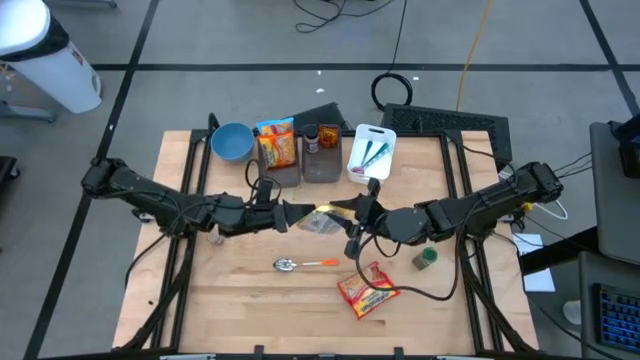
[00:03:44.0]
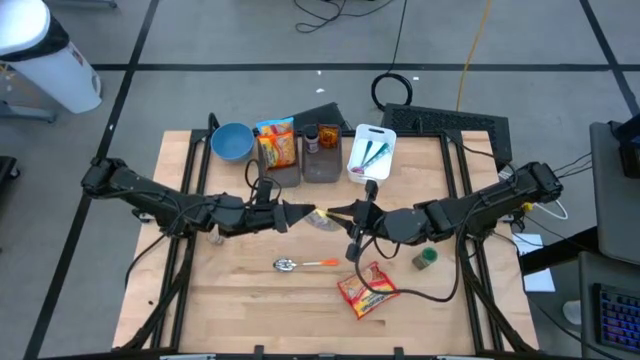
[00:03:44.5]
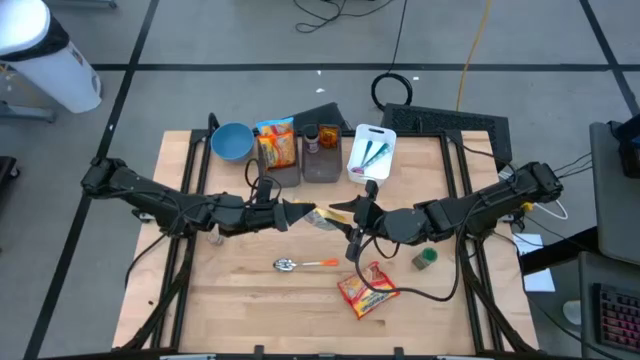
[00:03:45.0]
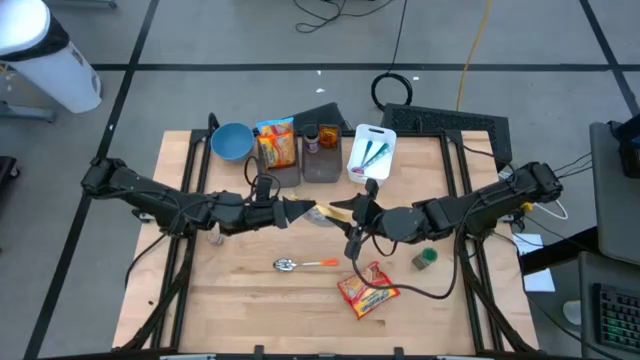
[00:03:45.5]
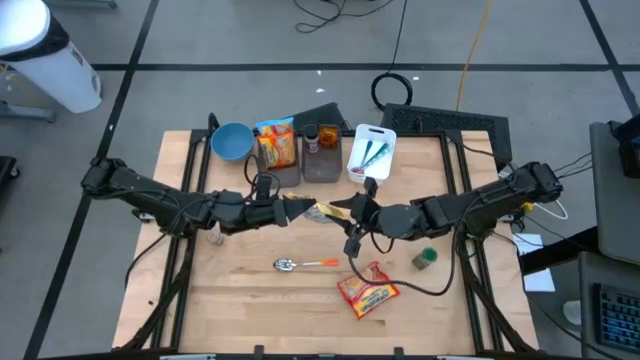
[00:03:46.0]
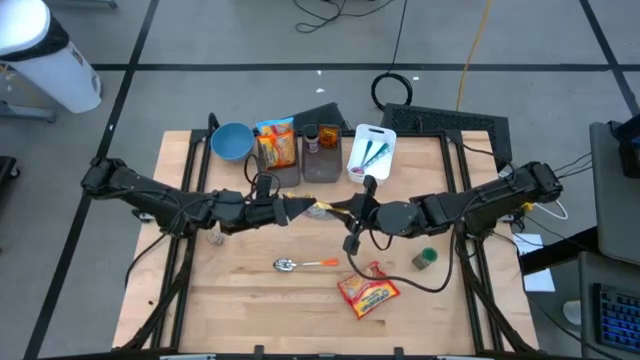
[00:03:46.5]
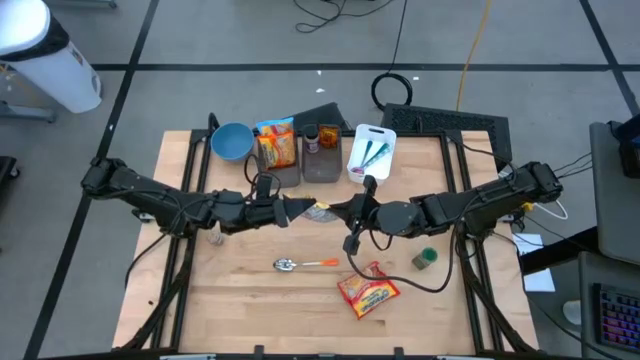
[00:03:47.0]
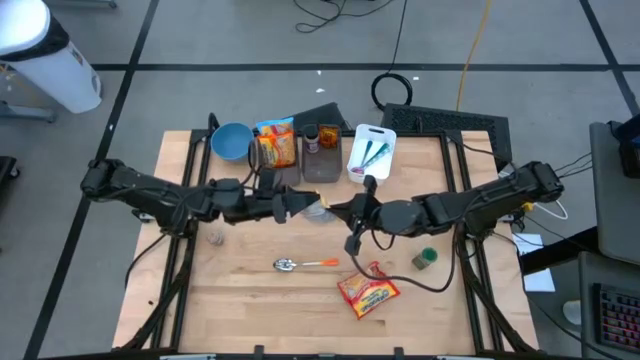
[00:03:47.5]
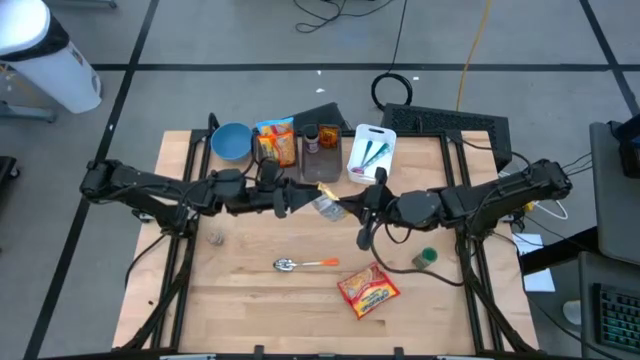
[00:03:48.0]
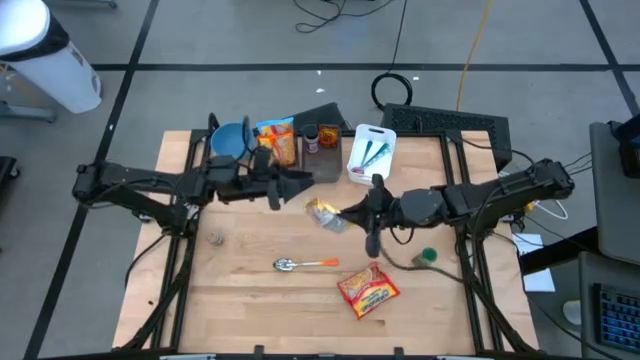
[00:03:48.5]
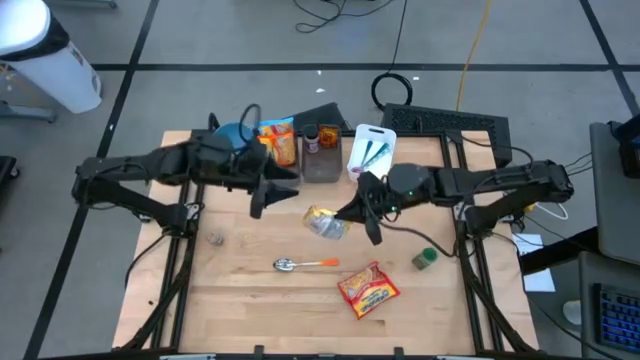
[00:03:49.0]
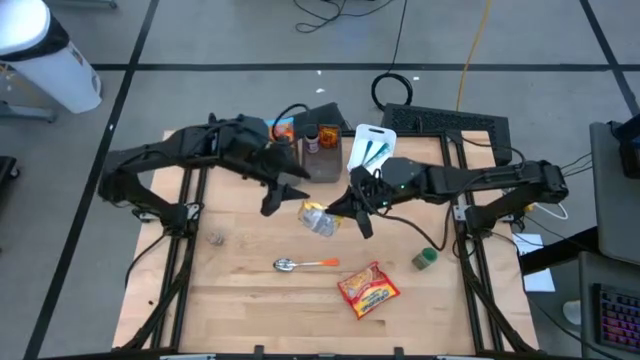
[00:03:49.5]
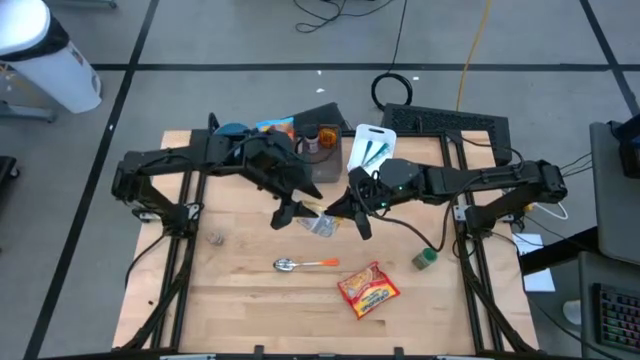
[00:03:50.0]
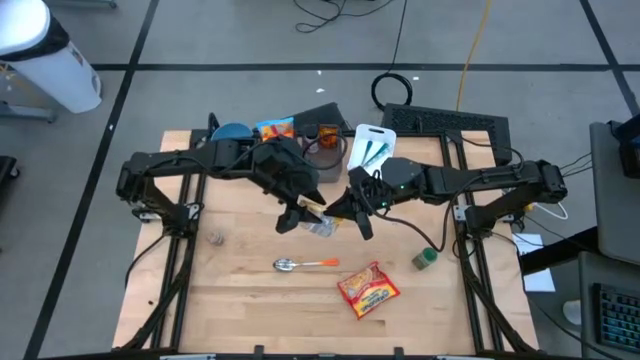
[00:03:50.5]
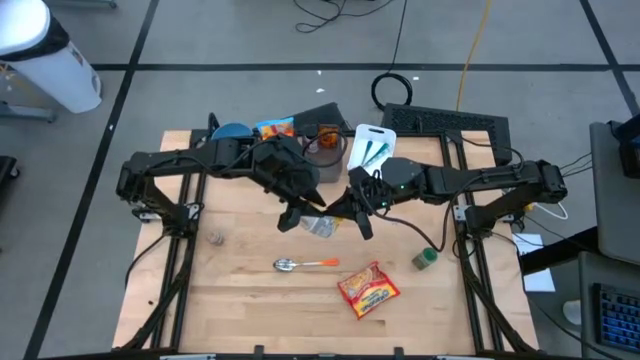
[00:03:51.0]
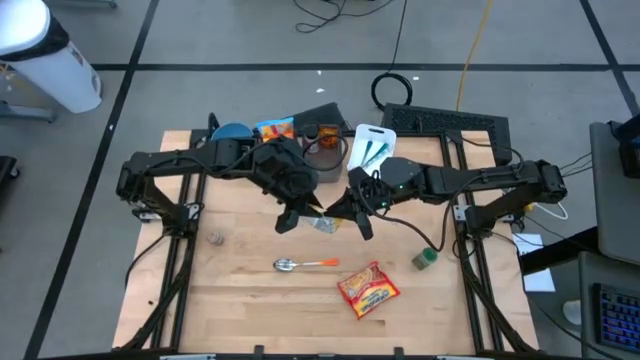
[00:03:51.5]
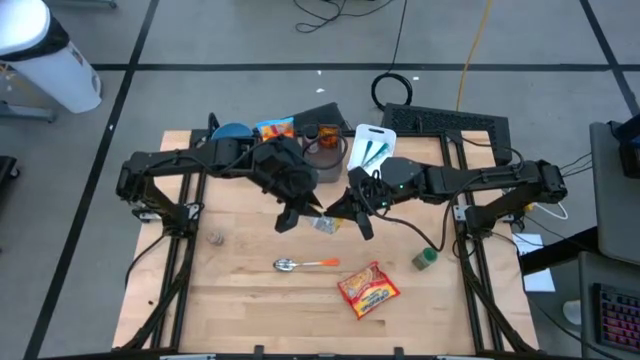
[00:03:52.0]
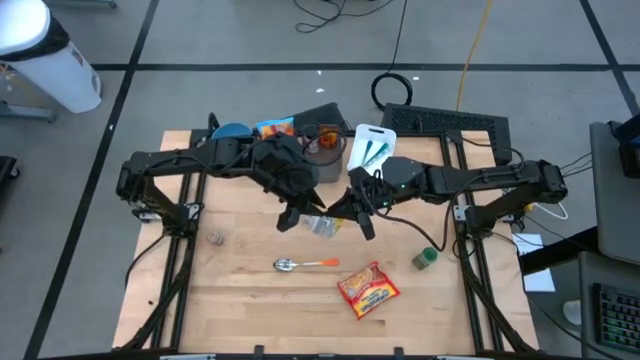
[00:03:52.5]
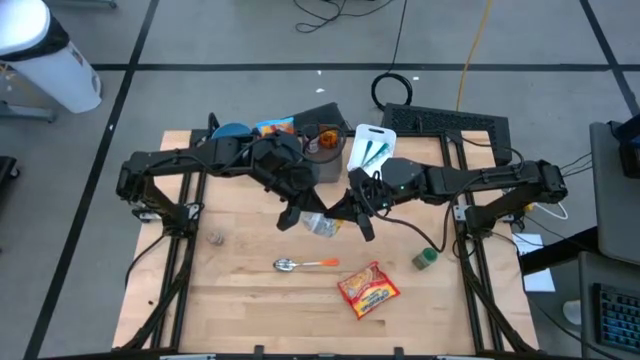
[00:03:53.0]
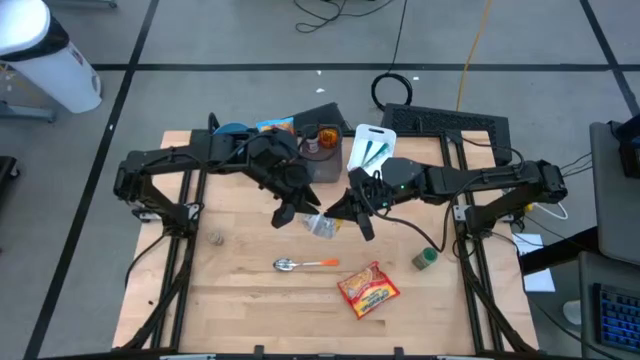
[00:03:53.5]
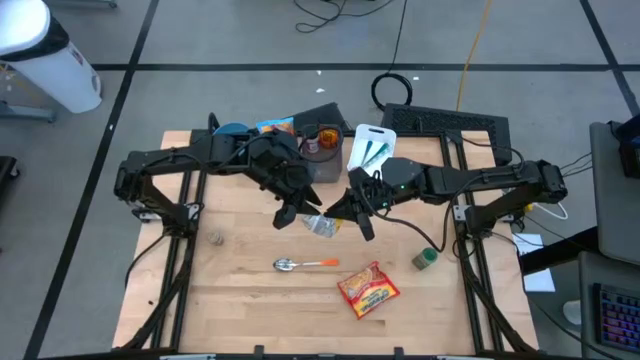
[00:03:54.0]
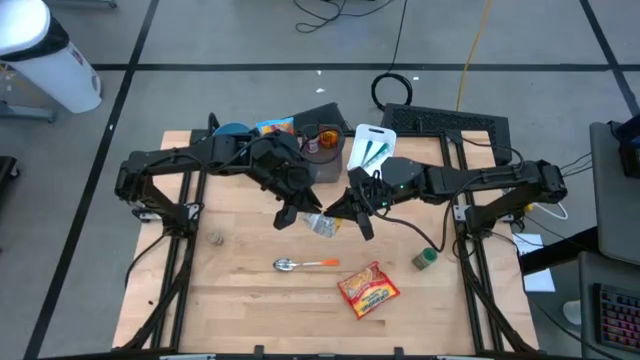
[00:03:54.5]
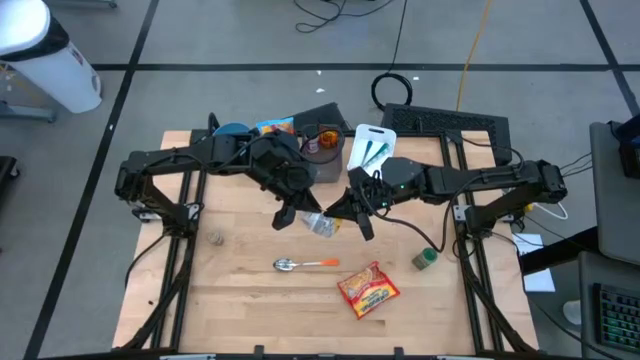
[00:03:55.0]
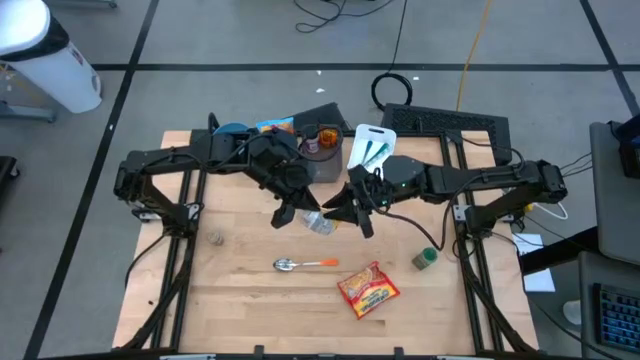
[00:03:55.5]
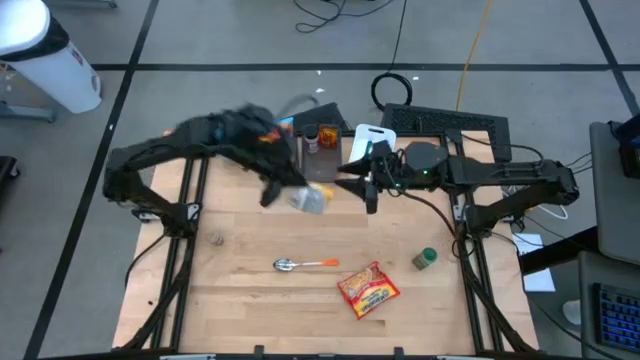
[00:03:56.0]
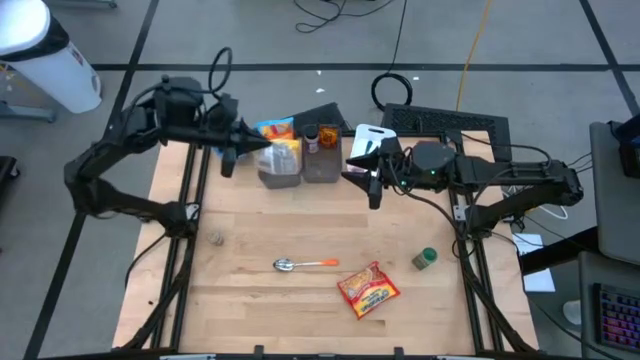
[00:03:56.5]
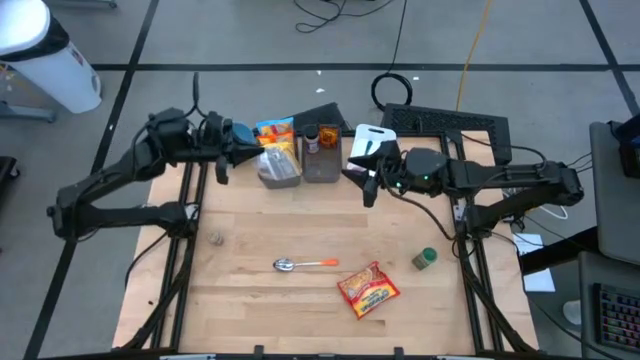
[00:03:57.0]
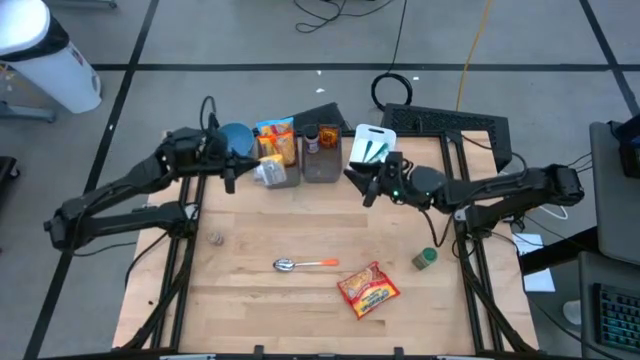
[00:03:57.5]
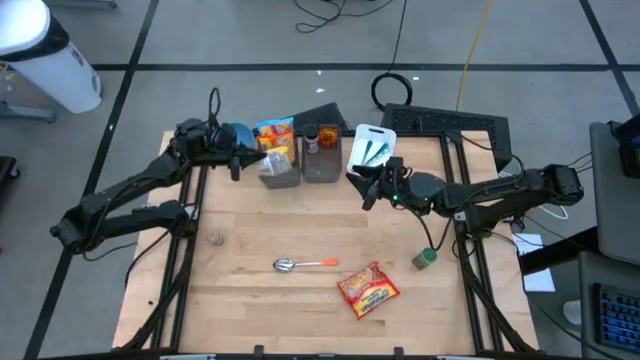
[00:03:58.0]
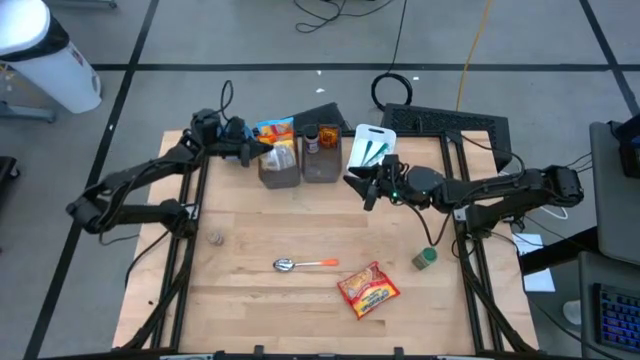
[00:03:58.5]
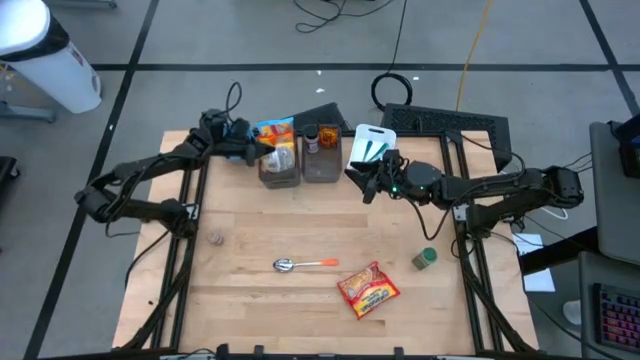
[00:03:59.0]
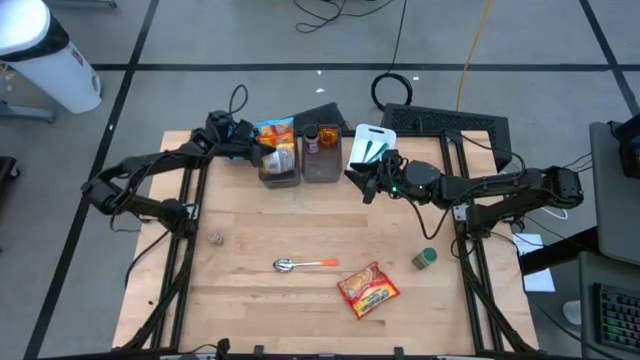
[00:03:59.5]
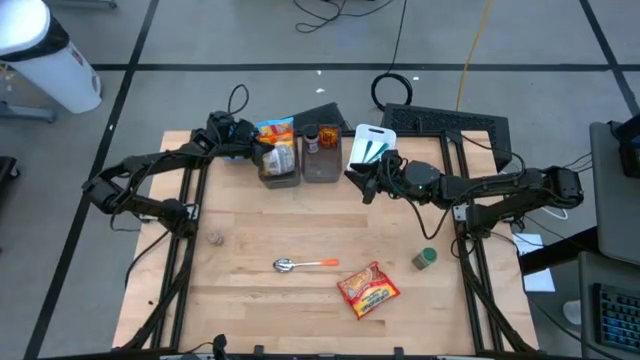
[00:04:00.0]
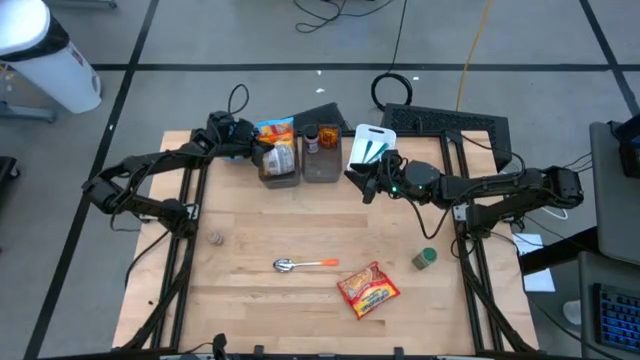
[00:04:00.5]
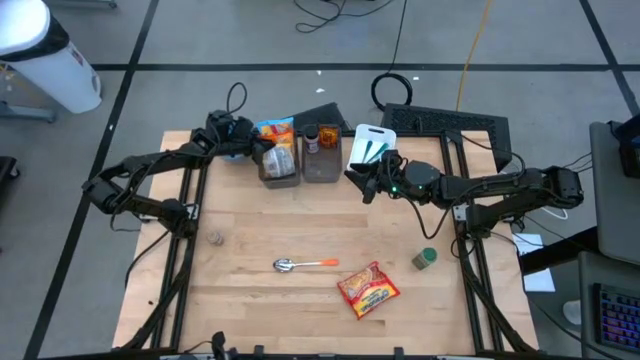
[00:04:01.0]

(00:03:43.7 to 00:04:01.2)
Task: Pick & Place Food Item
Put the yellow noodle pack into the left black bin

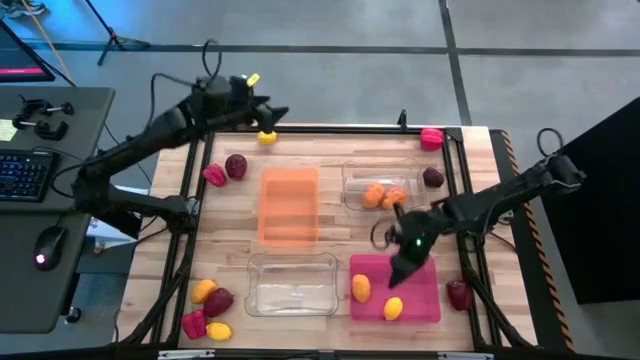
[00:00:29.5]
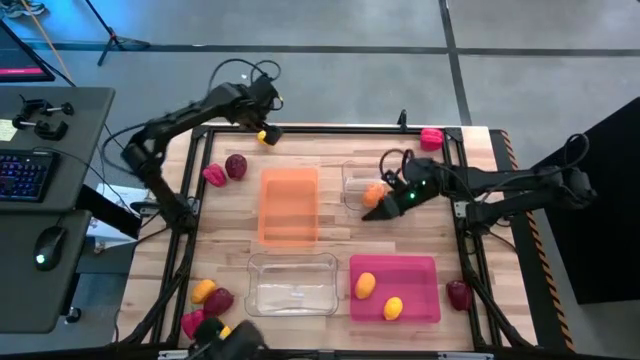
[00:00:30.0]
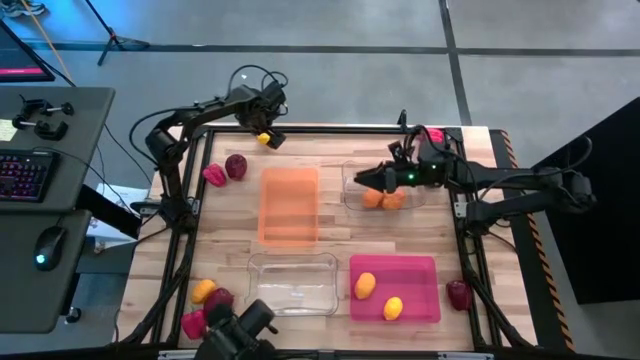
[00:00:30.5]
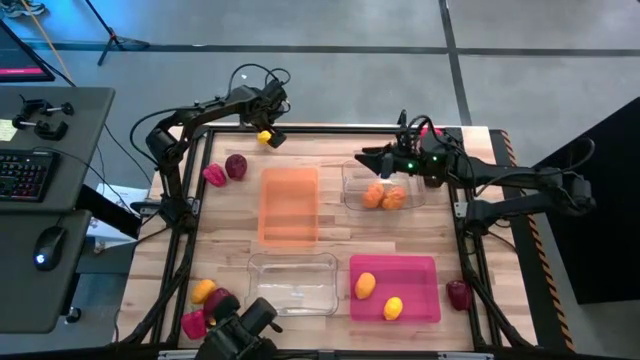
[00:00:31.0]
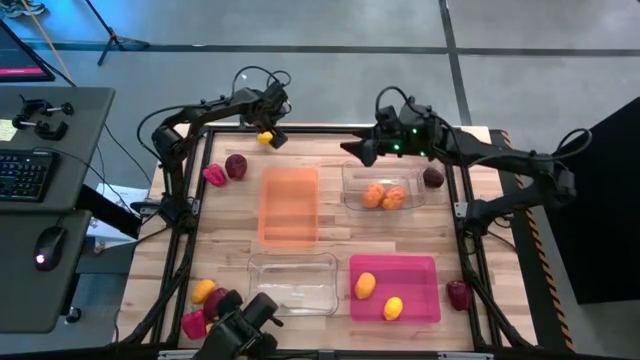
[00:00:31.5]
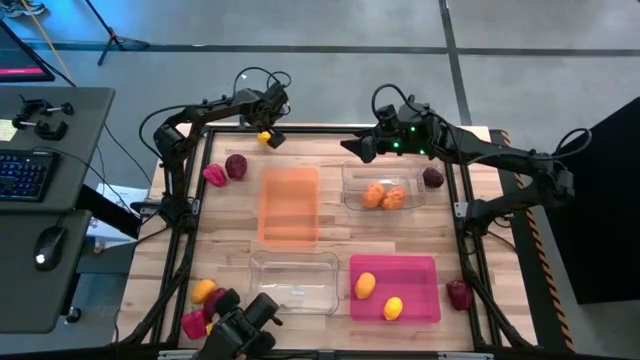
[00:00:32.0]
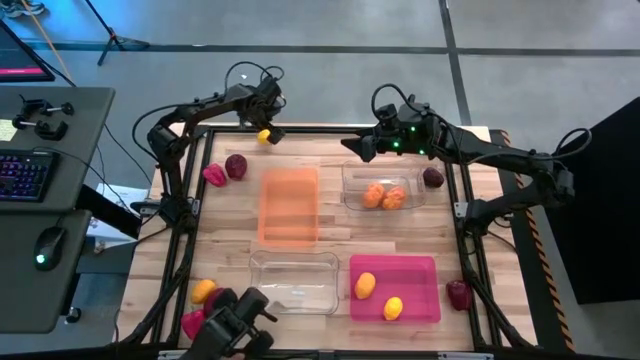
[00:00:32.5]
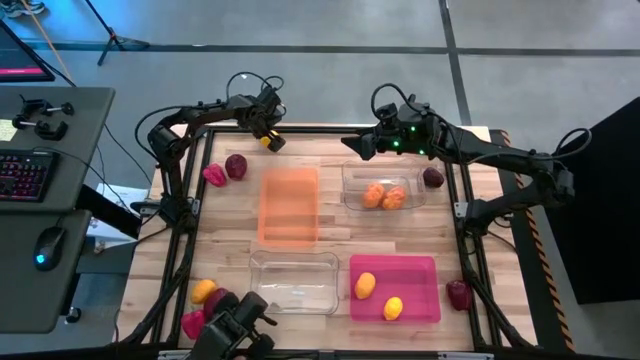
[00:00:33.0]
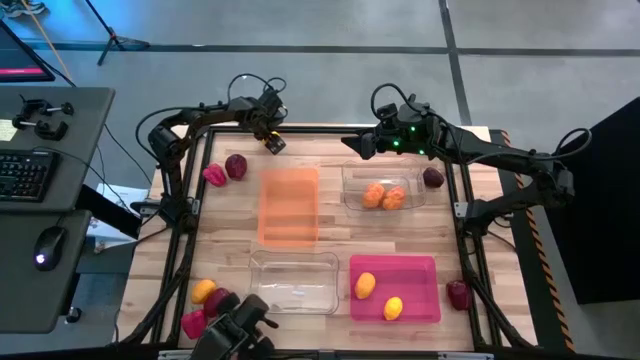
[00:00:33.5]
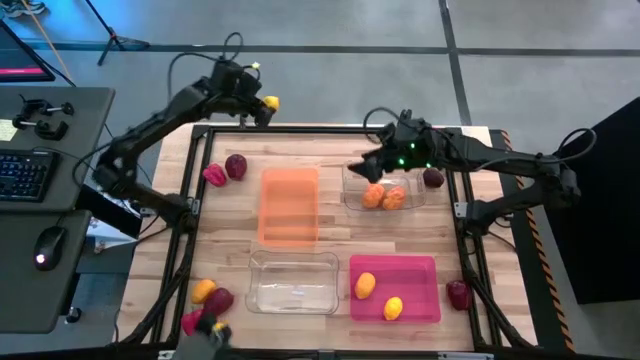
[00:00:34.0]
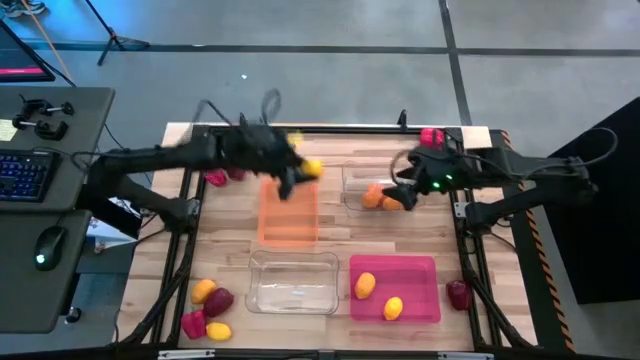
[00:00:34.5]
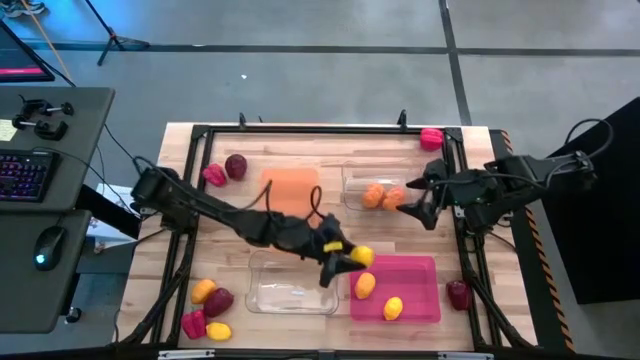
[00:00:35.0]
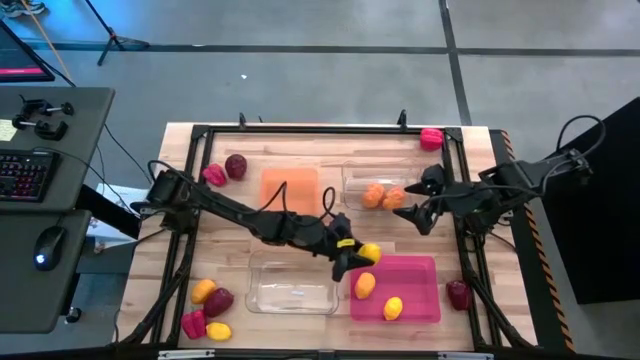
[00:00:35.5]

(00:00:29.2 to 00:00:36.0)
Task: Sort produce into baskets
Put the top lemon into the pink bin
